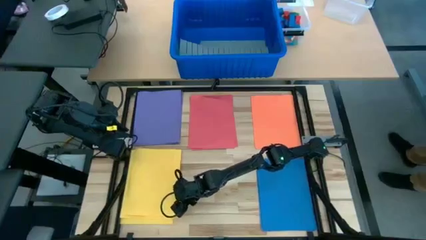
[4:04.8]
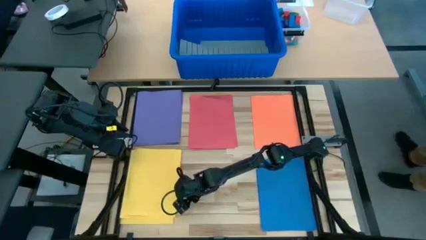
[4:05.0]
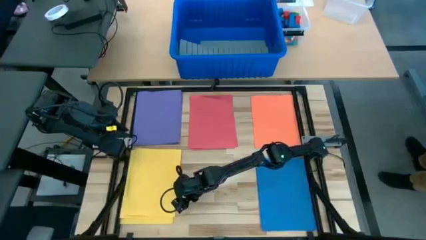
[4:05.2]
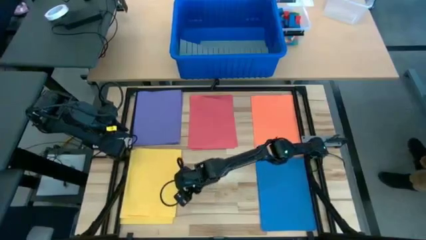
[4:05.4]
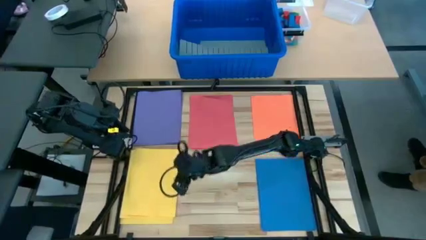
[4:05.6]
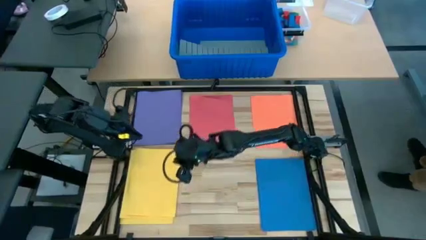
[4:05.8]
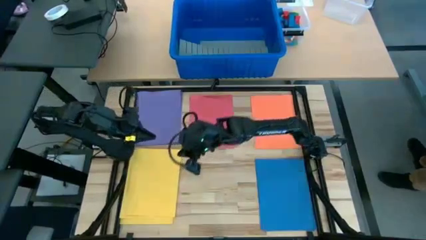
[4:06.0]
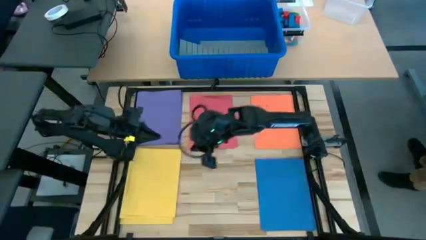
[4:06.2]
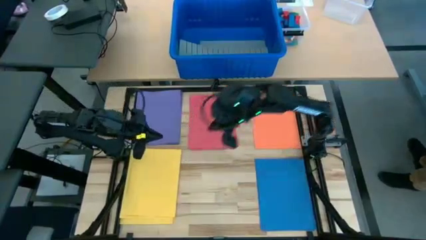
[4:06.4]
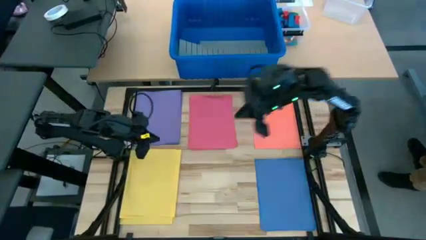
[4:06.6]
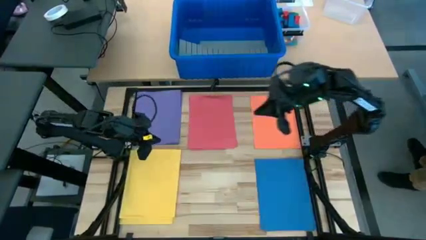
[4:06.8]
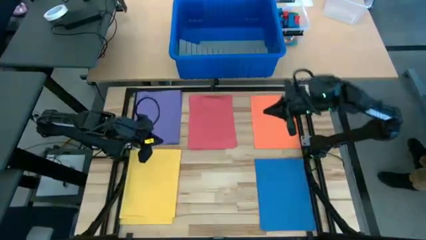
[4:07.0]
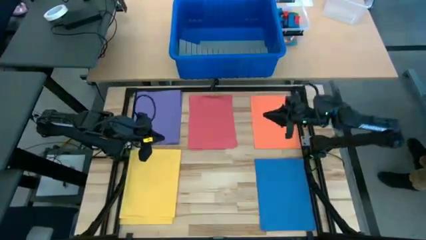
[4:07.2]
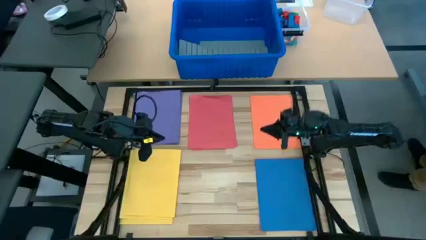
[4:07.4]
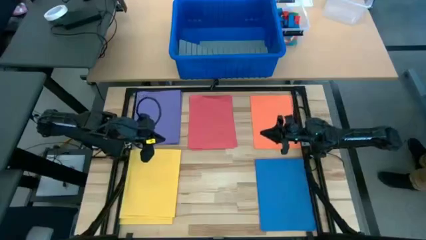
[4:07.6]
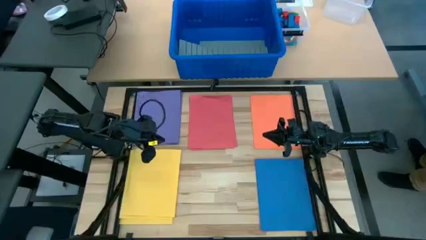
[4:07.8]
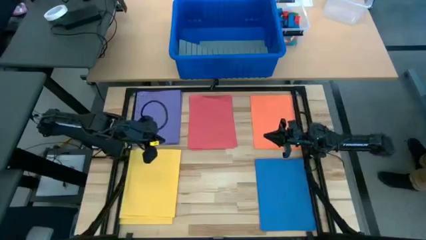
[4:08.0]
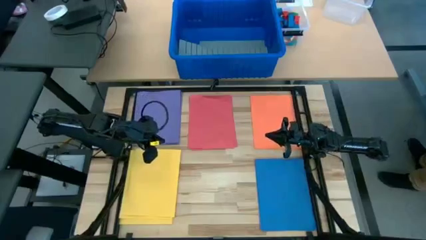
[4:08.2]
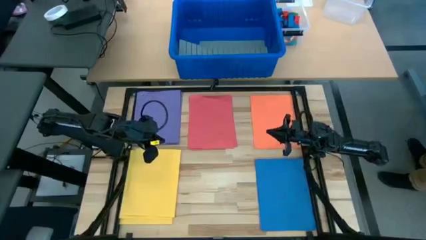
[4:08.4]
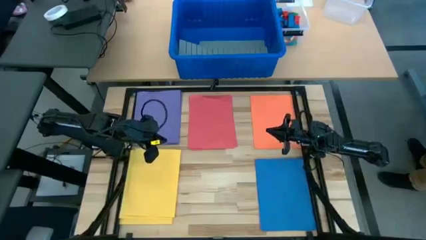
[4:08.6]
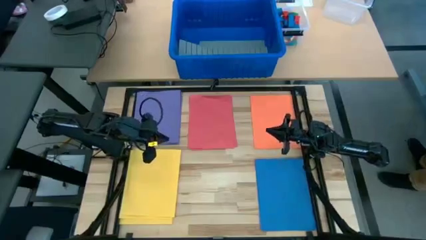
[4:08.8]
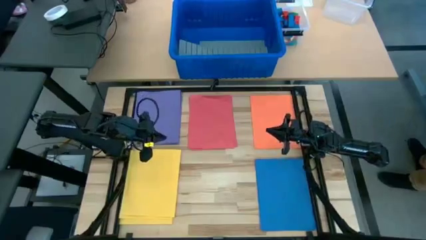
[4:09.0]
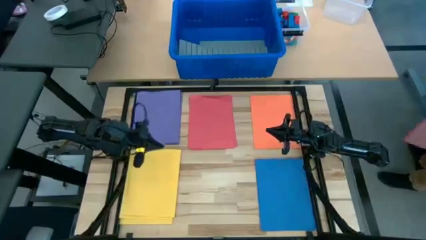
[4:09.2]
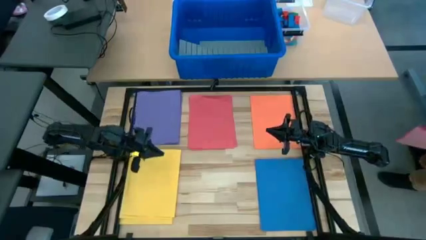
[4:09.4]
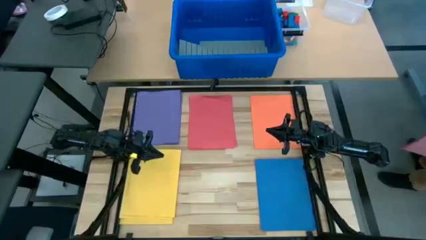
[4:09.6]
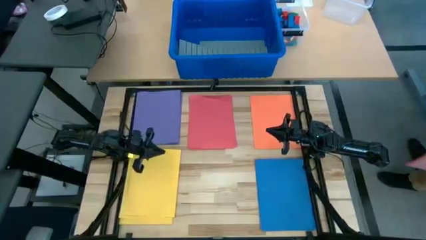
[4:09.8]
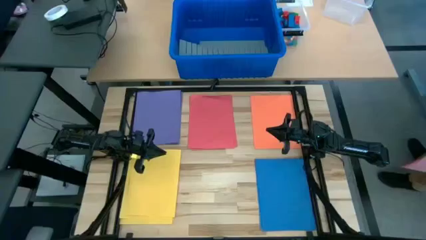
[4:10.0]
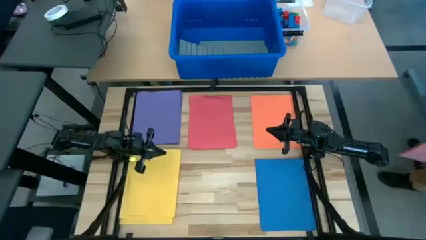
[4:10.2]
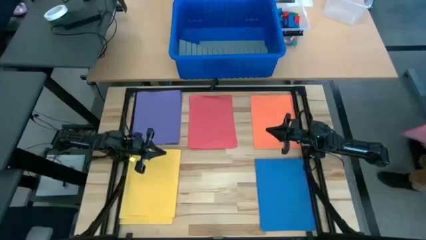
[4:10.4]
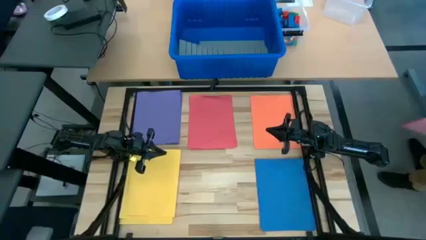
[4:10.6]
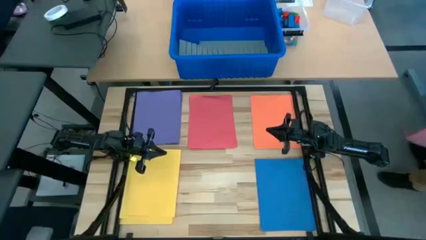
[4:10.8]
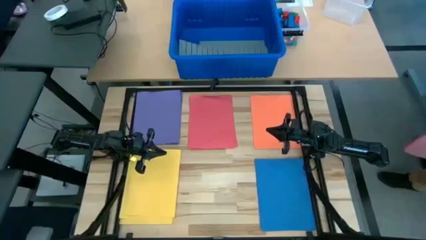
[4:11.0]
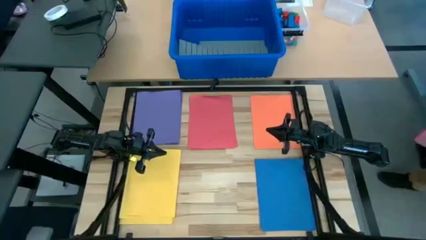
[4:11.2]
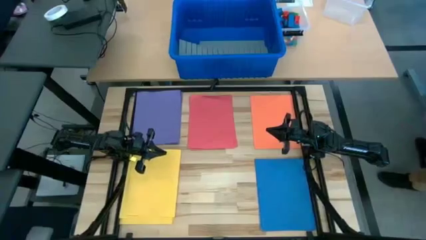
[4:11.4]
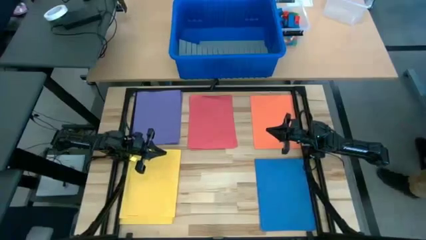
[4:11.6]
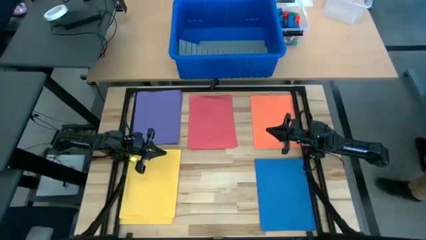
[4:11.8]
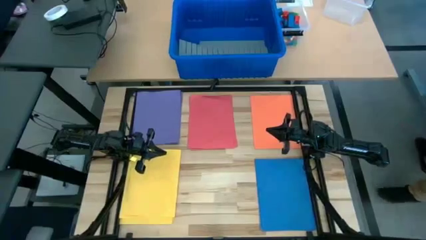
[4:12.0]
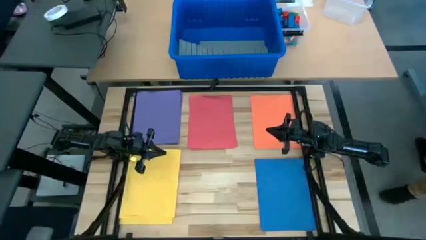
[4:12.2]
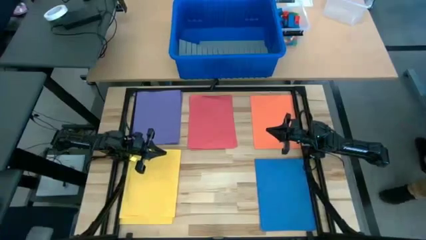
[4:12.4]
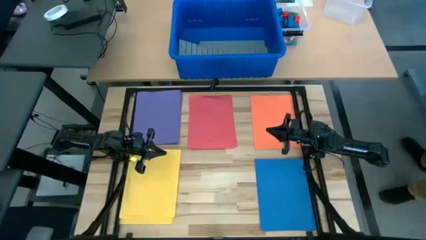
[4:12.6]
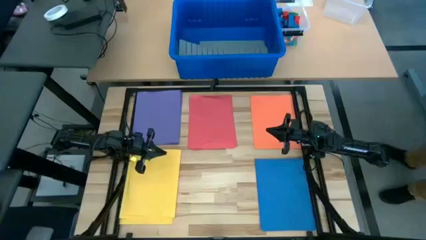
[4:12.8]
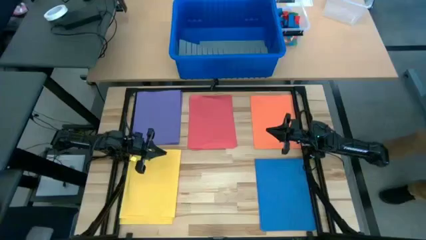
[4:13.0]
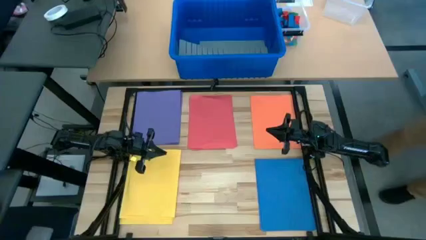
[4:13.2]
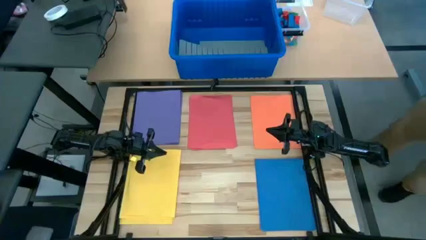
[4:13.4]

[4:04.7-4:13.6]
Task: Organize paper
Return to Home Position

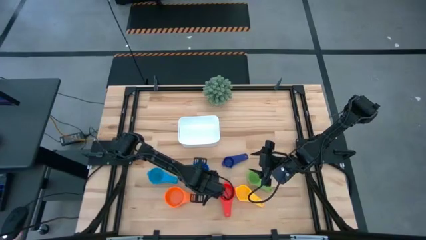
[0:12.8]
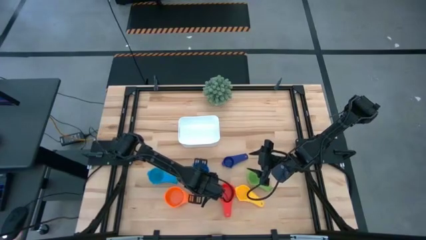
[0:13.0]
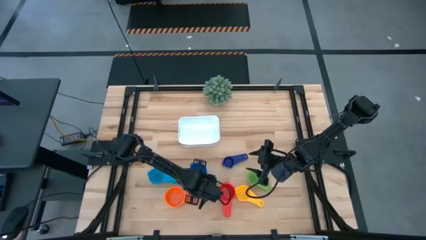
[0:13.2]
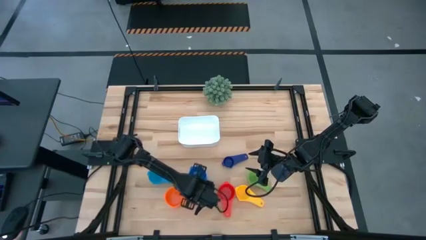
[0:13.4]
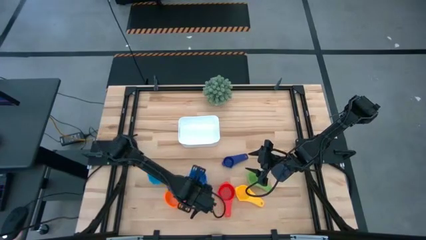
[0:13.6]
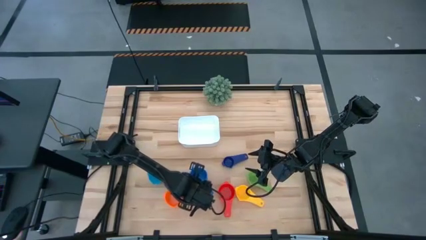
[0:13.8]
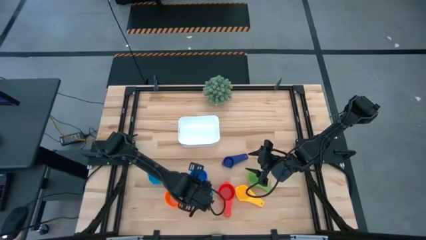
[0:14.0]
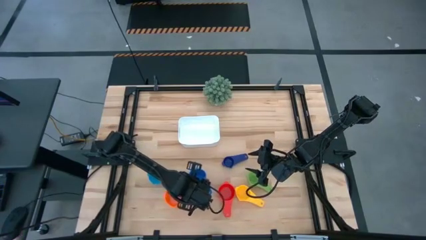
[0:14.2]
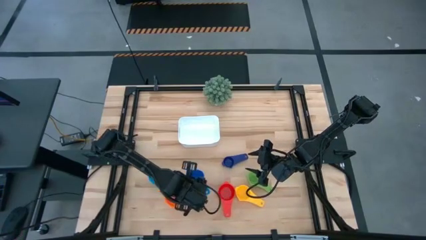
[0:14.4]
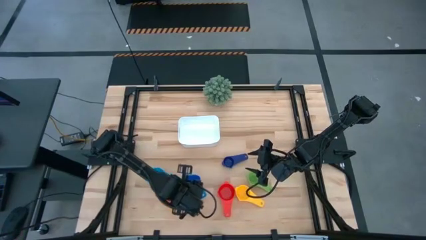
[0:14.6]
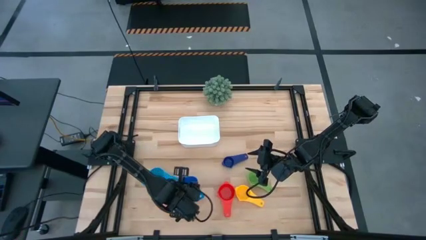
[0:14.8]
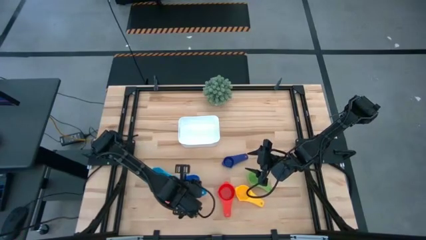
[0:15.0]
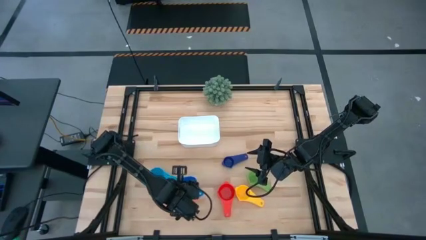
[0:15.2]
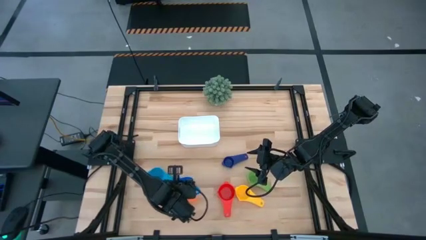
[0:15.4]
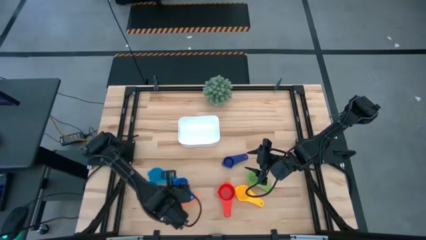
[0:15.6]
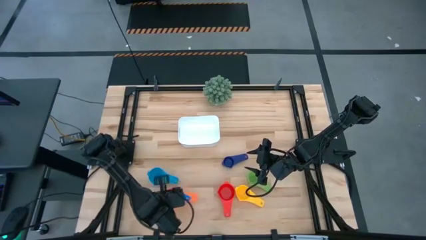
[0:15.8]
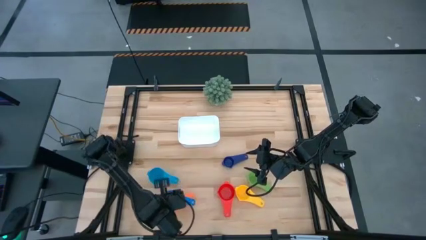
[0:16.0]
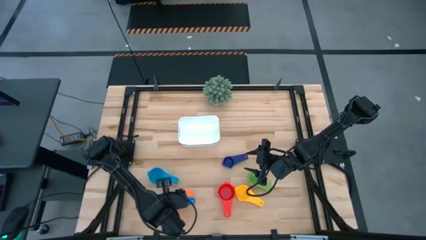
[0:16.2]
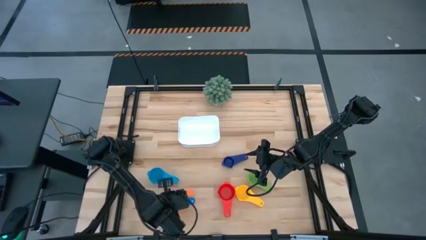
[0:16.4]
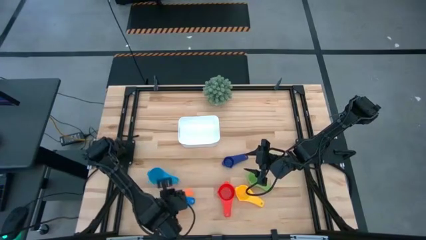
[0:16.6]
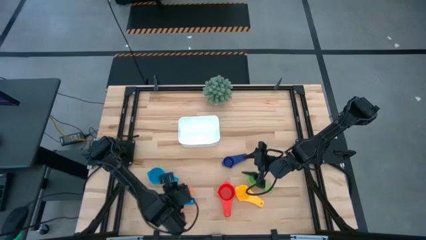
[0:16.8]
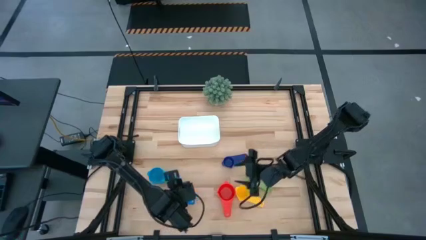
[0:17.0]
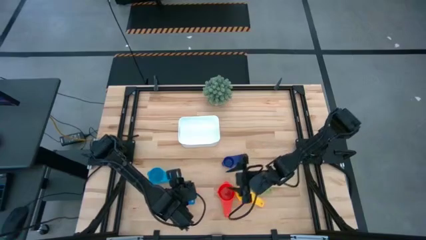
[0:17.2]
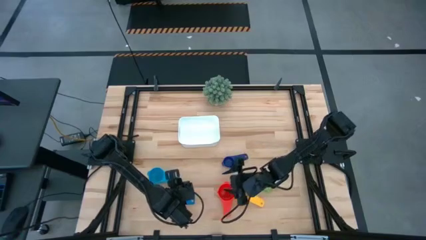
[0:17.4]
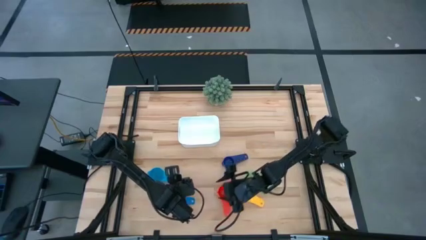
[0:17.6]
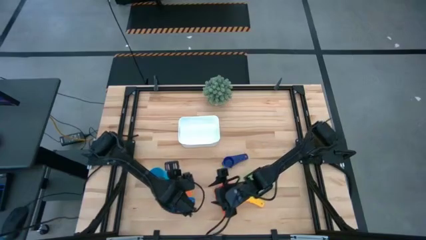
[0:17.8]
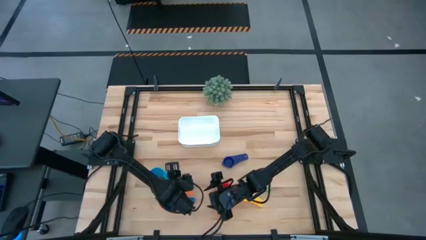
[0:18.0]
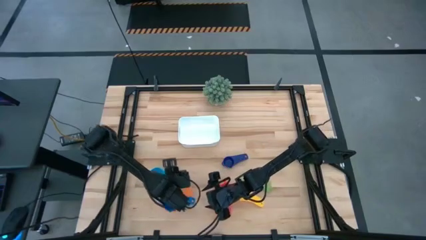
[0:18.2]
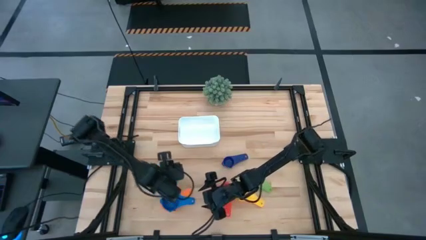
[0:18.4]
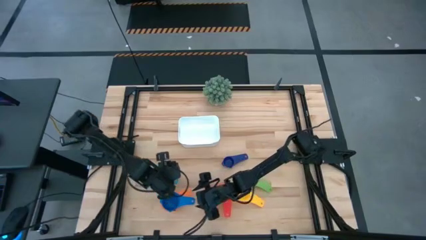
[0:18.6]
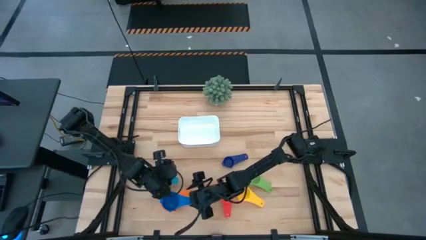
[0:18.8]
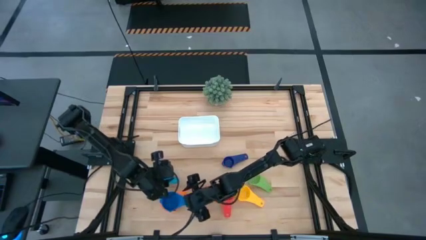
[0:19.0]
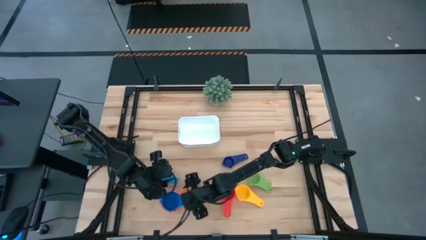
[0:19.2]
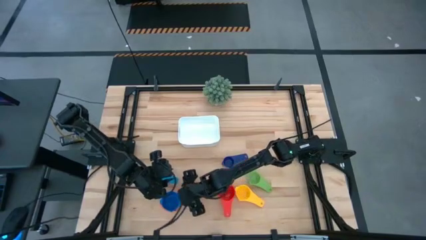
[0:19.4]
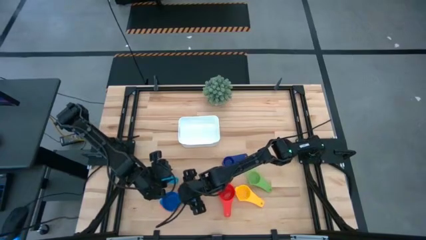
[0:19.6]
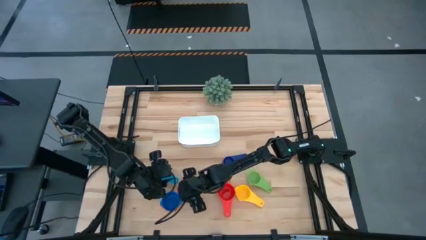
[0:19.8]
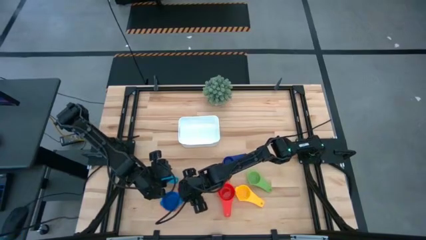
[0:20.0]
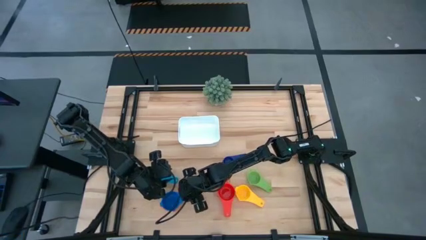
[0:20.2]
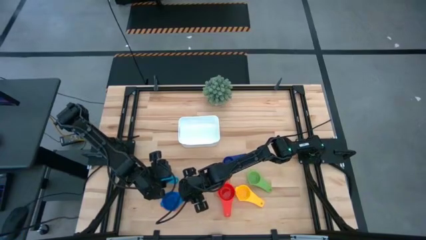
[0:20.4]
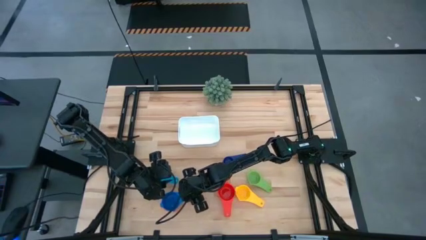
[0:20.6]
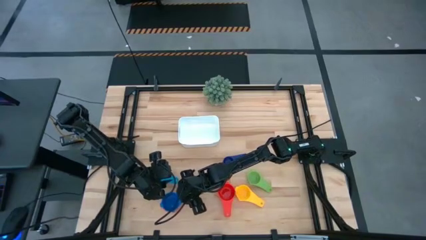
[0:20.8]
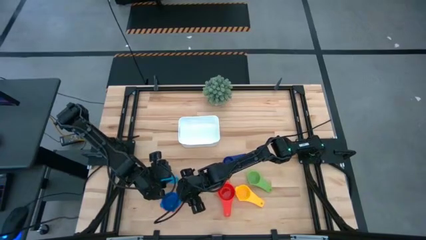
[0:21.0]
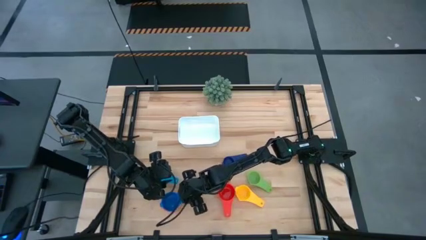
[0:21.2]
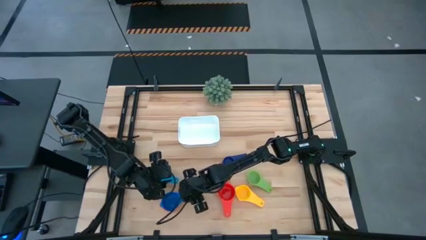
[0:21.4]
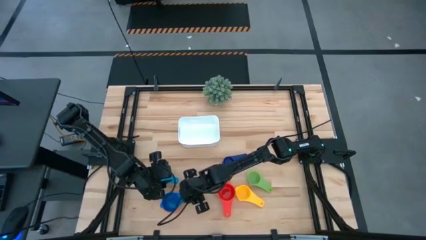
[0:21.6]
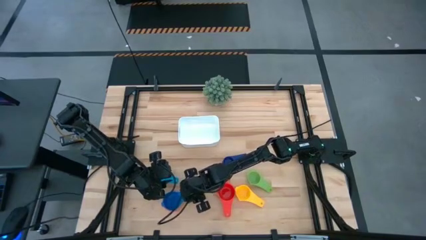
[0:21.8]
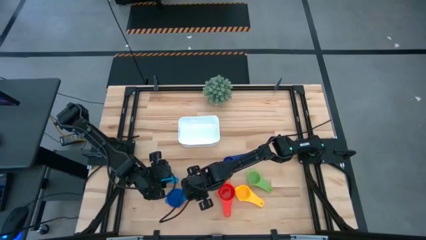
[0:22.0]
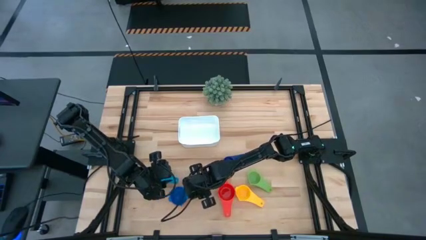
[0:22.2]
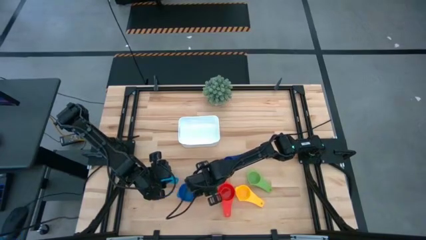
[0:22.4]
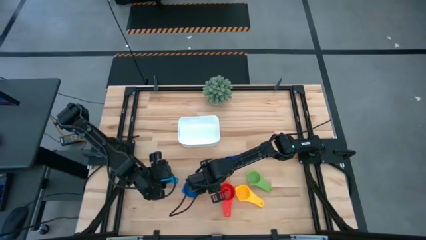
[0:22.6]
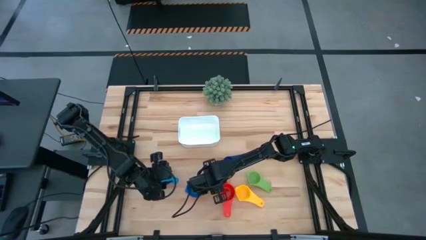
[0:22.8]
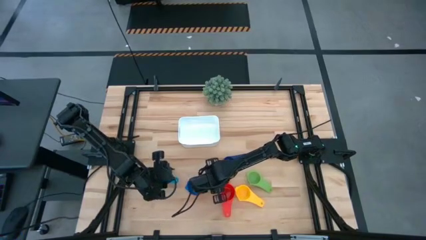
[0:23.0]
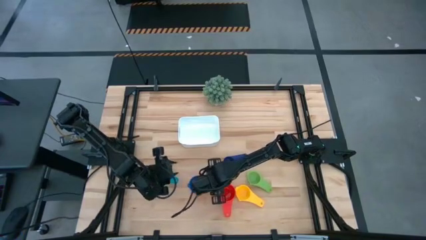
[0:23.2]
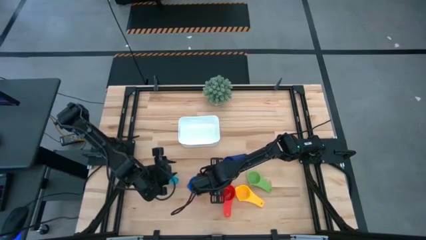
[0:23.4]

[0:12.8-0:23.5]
Task: Nest measuring cups in basket
Stack the large blue measuring cup on the top orange measuring cup
